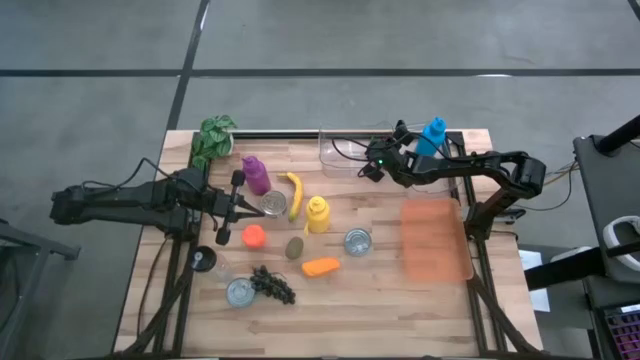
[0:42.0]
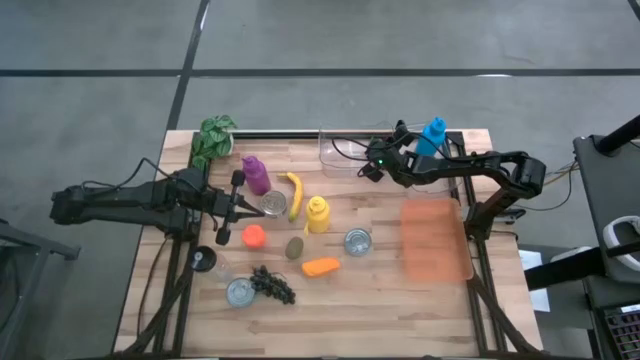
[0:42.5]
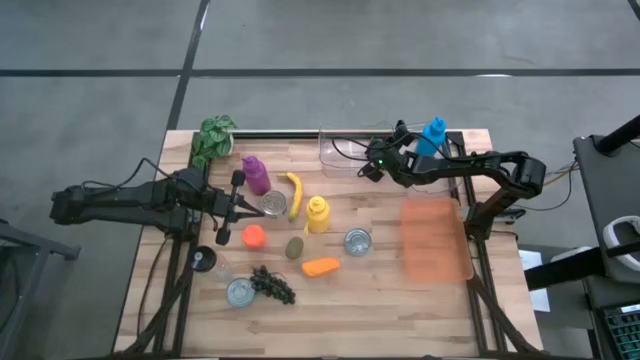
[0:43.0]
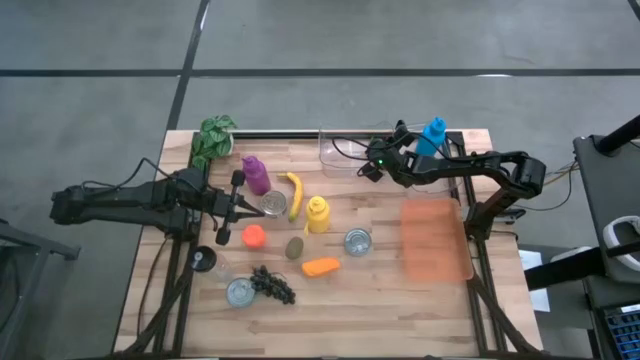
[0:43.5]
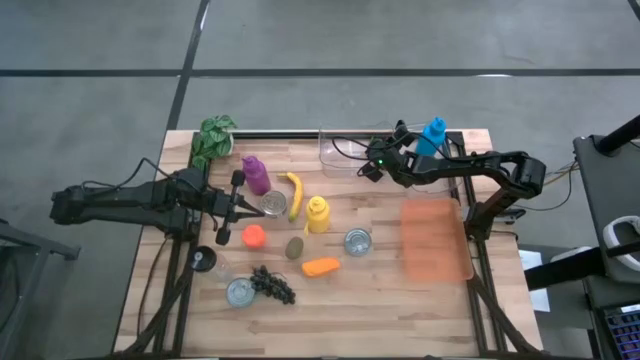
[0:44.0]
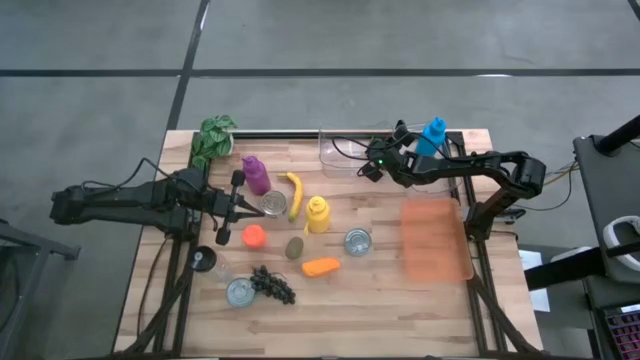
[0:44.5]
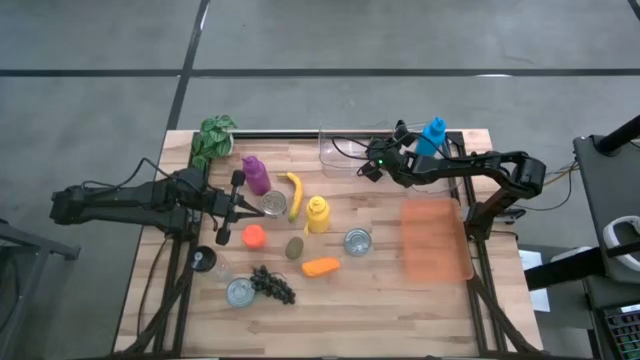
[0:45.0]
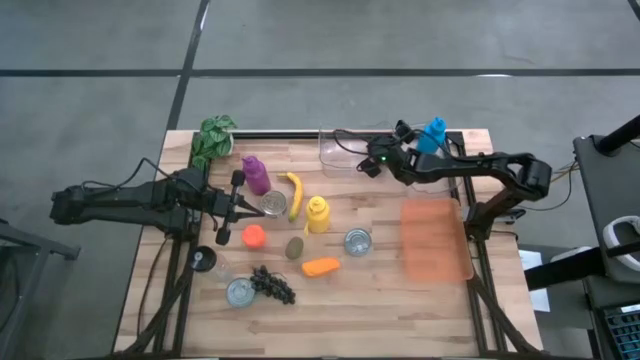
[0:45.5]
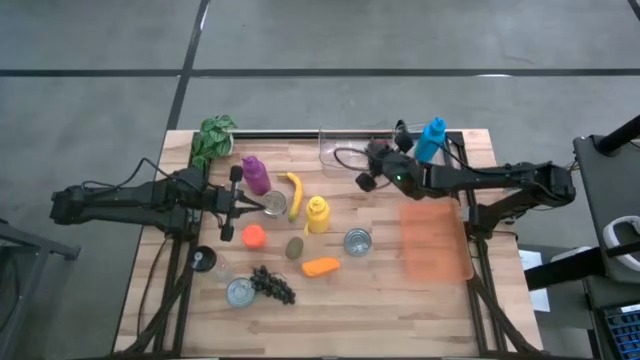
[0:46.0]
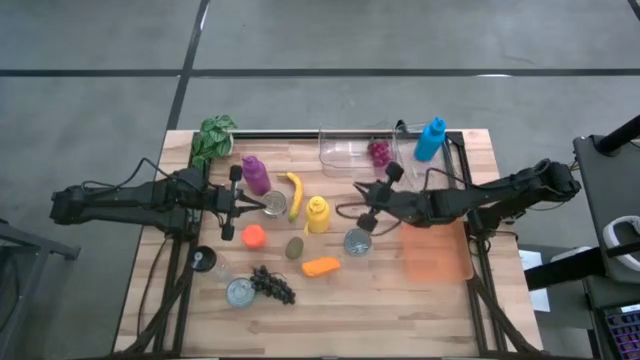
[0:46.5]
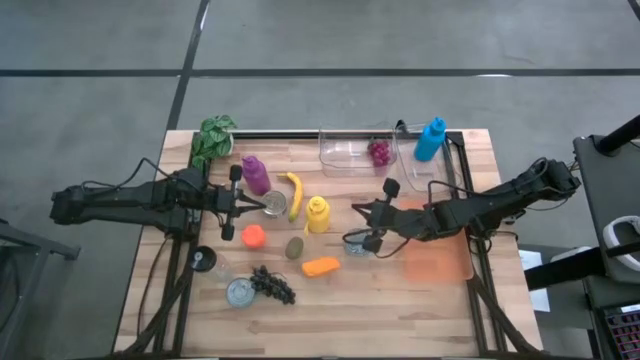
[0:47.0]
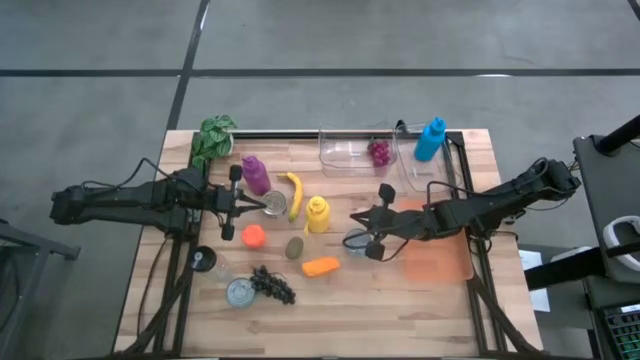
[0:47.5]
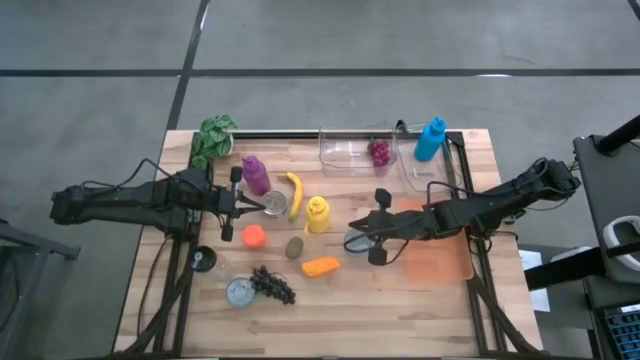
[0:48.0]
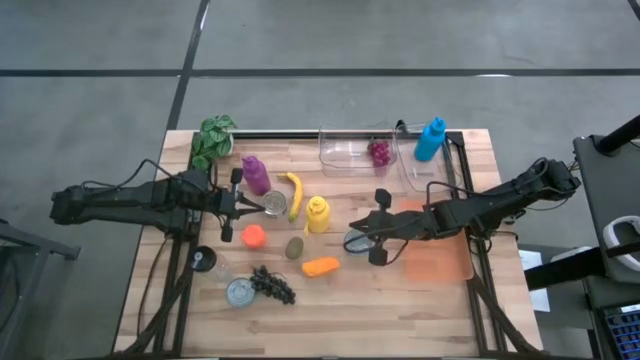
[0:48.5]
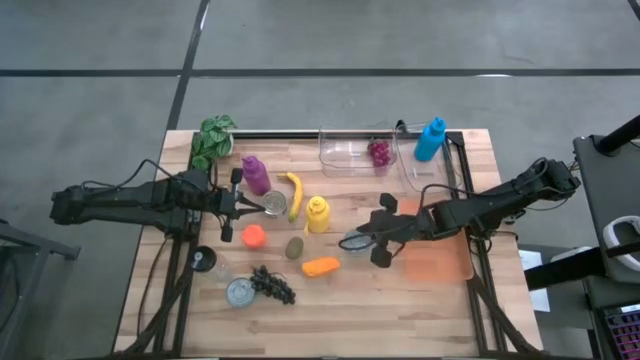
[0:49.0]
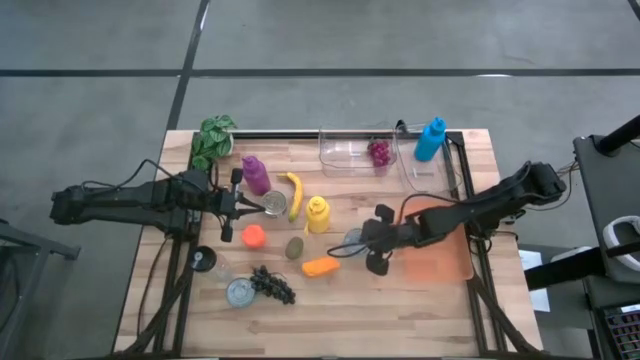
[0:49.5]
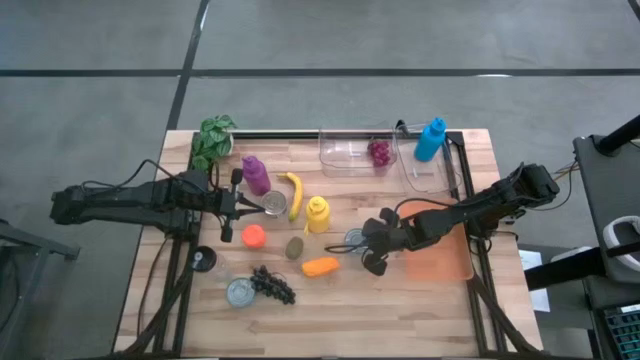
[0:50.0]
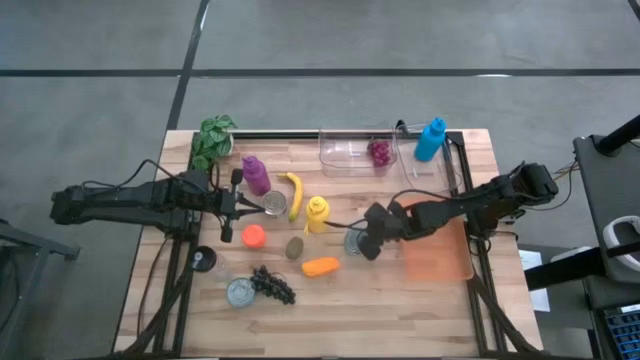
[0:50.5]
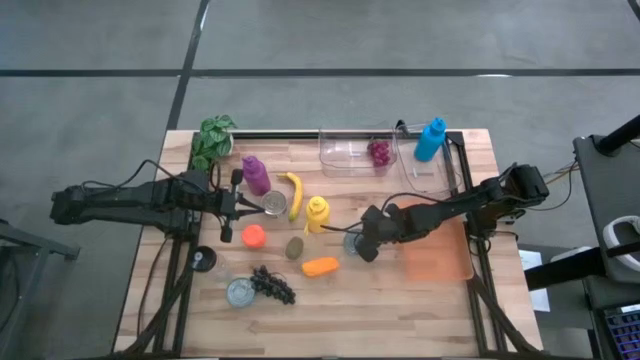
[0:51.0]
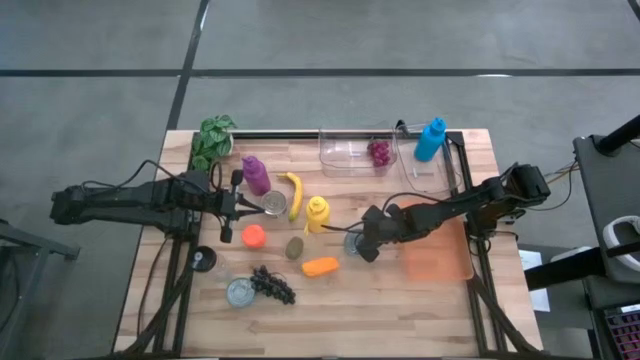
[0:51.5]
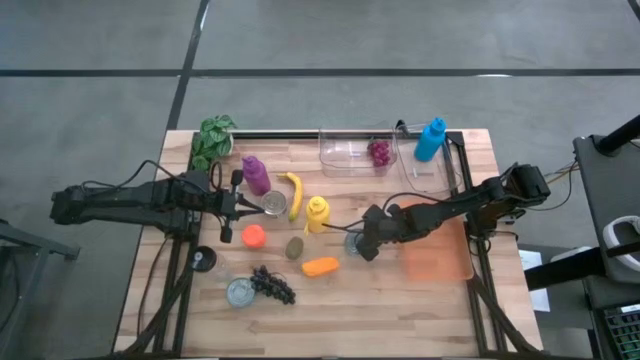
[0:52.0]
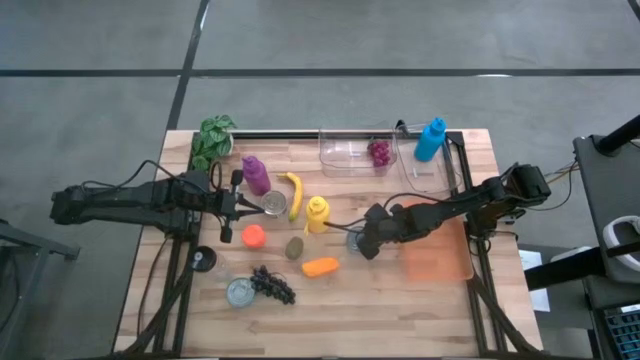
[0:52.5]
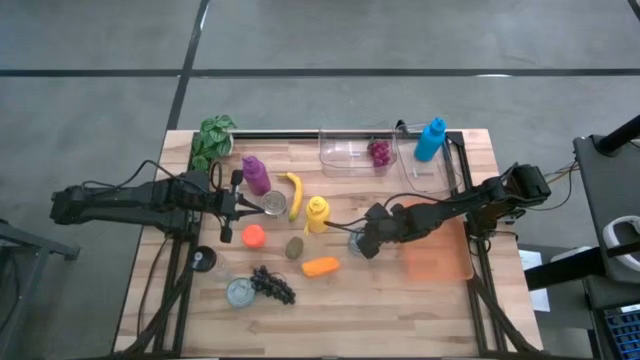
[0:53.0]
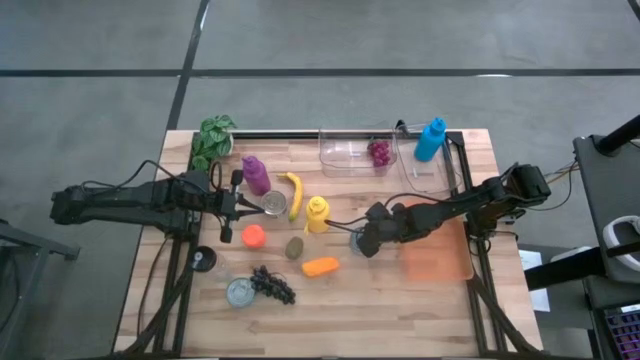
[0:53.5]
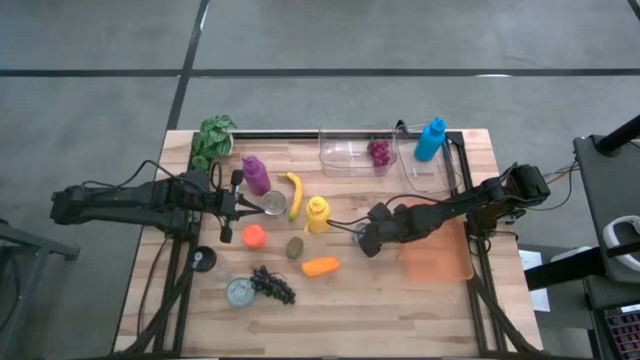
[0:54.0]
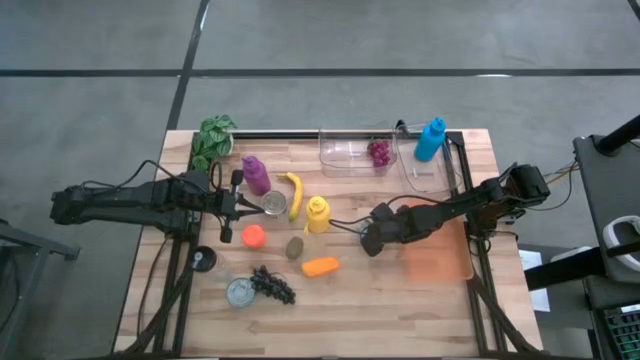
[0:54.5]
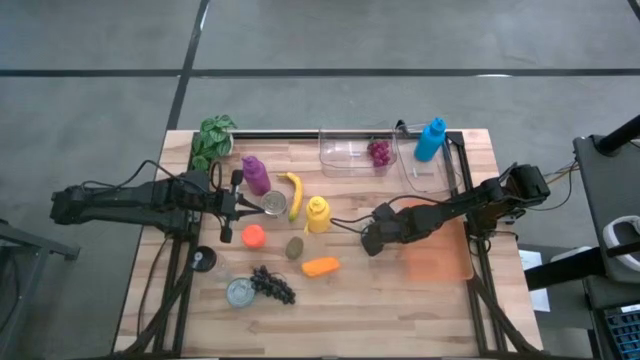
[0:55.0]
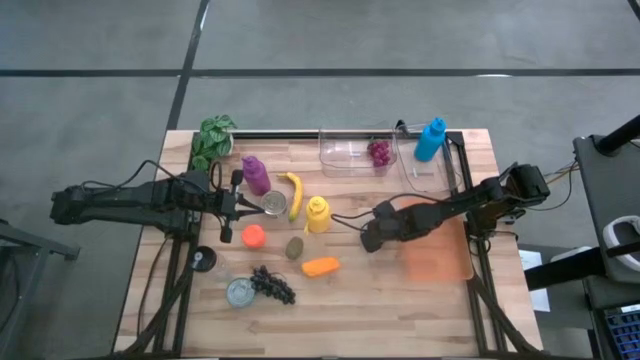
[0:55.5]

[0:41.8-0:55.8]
Task: Pick & Place Food Item
Put the yellow and blue tuna can into the orange bin
